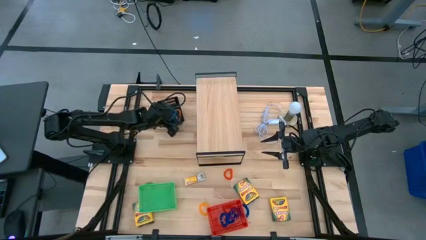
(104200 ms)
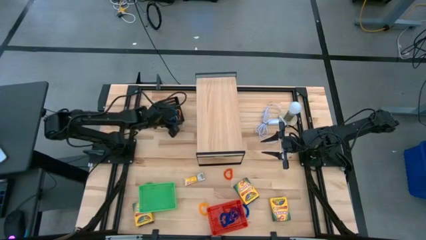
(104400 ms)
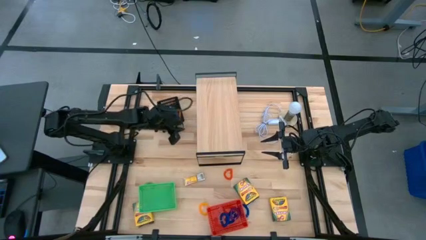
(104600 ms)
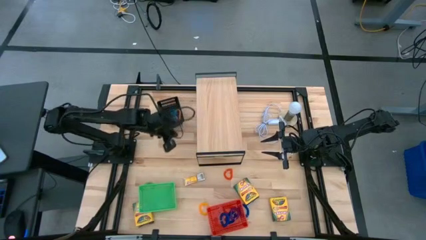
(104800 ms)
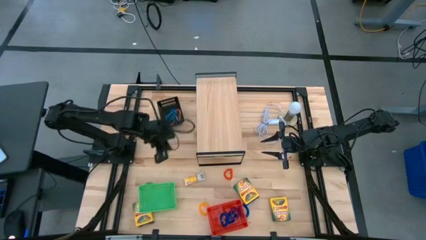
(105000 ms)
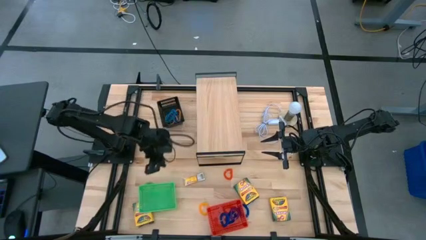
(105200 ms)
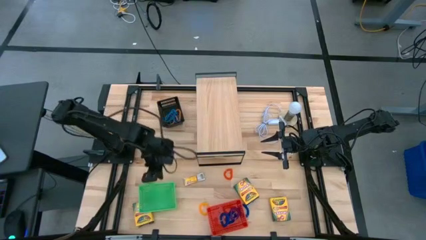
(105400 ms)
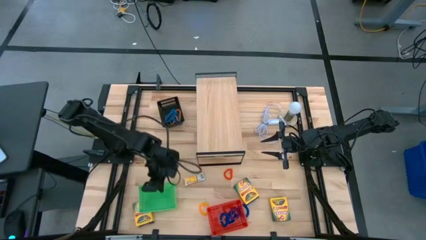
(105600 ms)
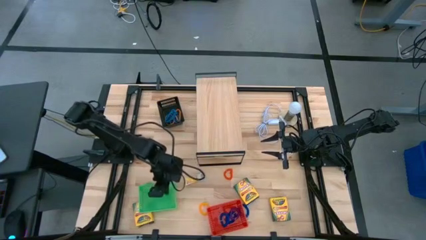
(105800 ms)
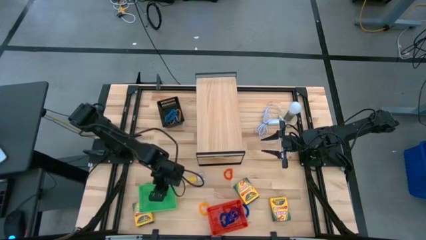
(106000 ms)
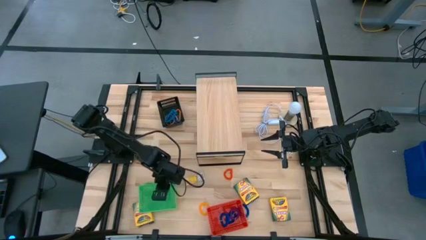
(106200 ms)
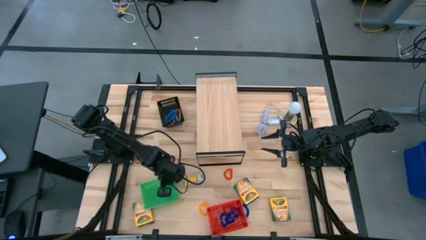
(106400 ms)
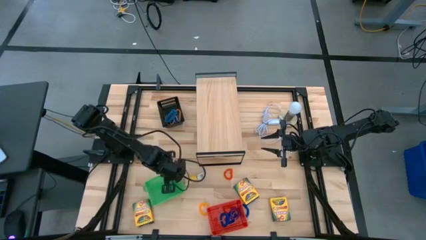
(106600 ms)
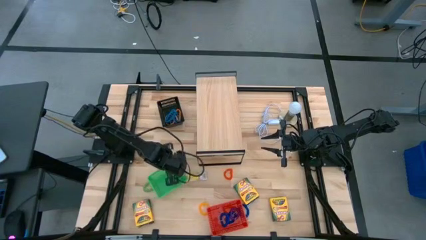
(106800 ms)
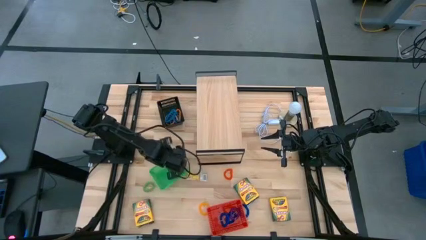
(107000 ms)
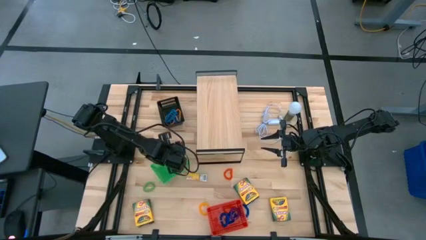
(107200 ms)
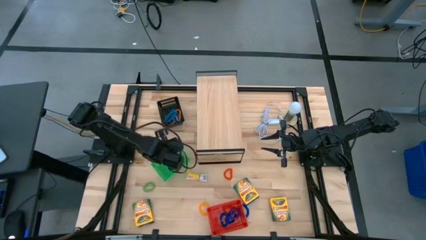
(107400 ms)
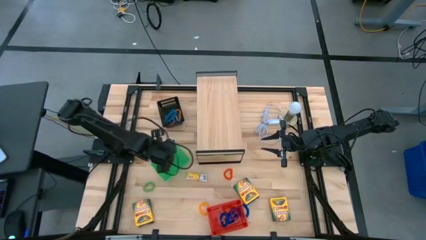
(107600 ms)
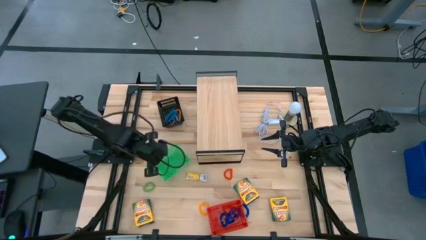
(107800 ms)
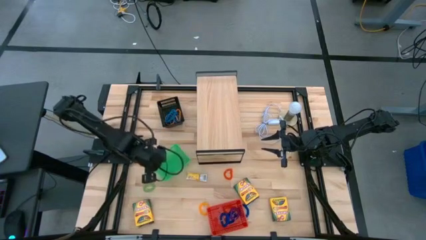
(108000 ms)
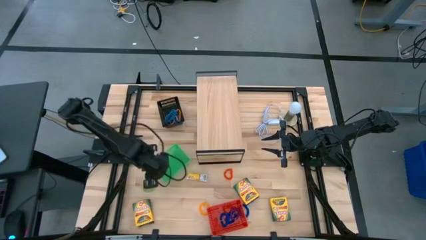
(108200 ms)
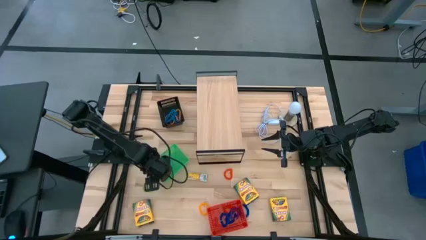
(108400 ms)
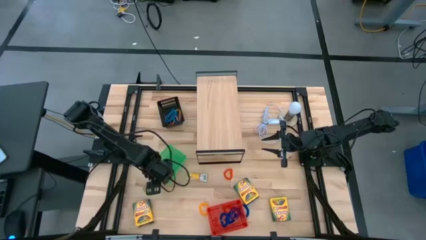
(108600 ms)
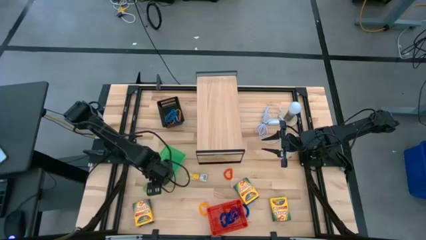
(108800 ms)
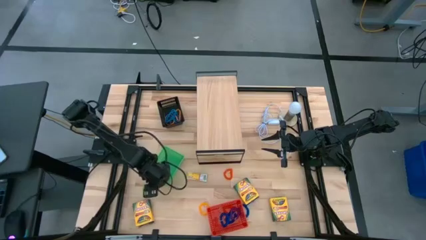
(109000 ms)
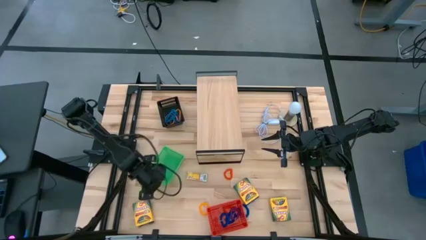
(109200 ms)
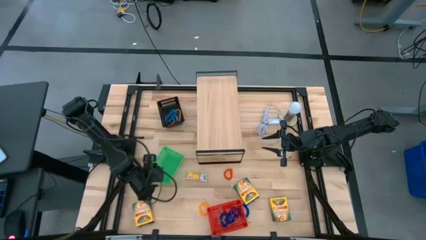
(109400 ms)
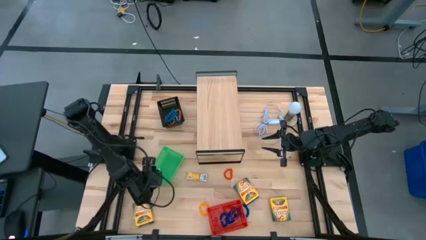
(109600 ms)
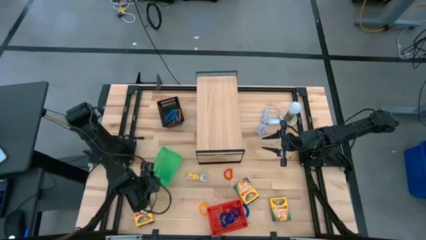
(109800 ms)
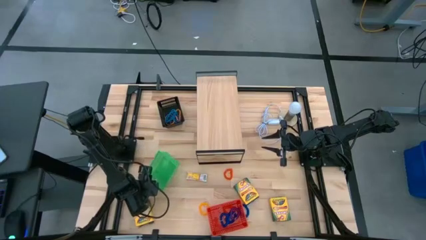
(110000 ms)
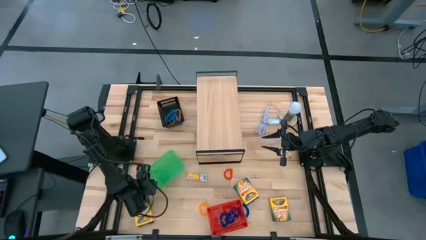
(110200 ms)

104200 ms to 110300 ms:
Task: Pick & Place Office Desk Supplies
Adjust the green basket on the table

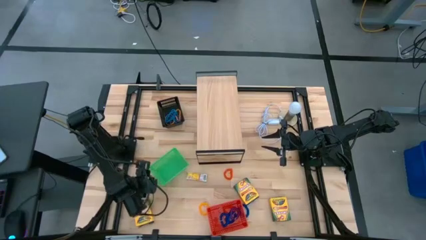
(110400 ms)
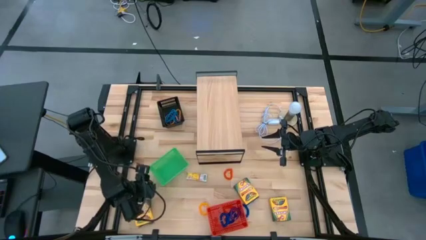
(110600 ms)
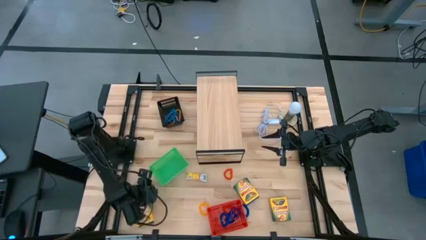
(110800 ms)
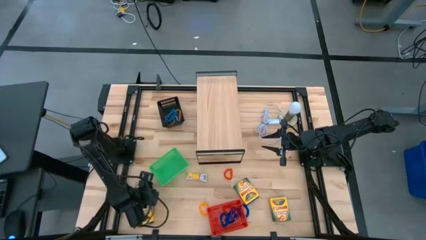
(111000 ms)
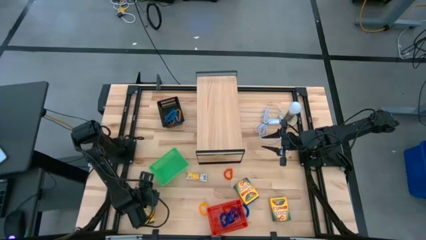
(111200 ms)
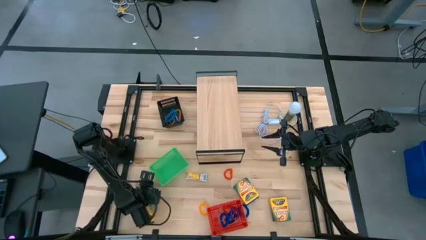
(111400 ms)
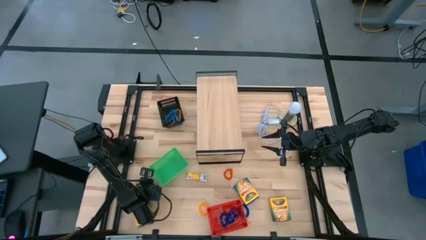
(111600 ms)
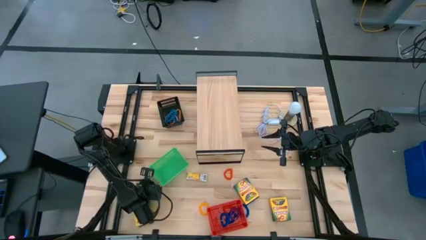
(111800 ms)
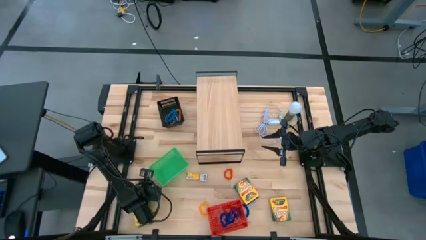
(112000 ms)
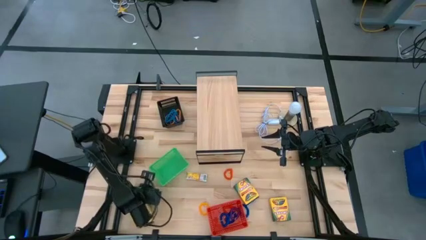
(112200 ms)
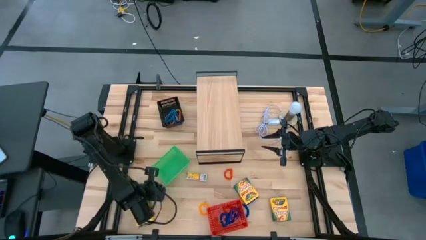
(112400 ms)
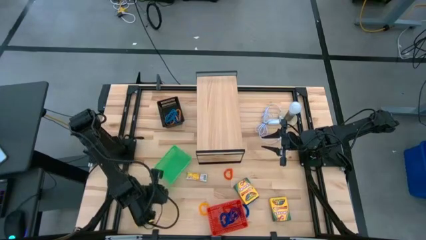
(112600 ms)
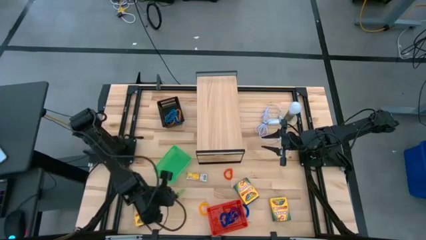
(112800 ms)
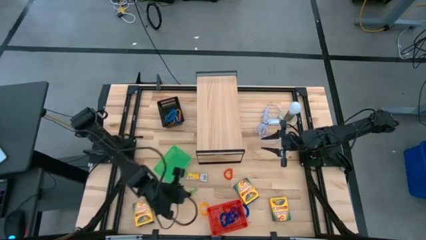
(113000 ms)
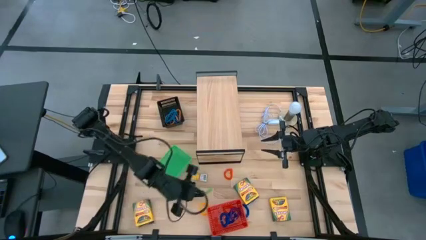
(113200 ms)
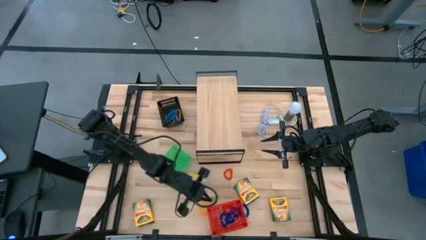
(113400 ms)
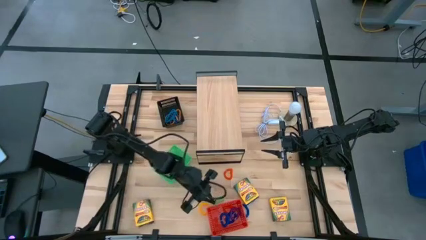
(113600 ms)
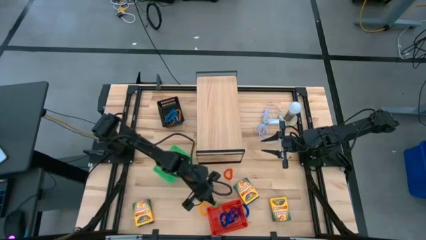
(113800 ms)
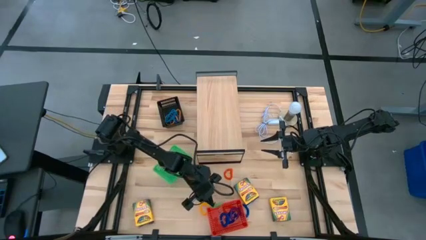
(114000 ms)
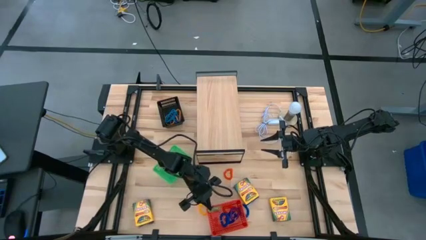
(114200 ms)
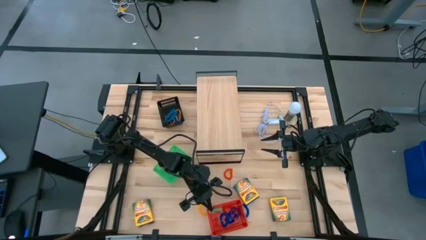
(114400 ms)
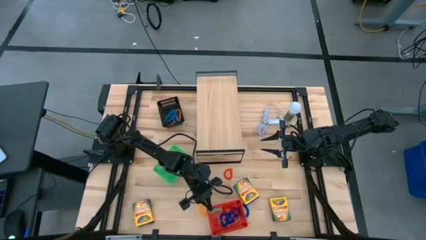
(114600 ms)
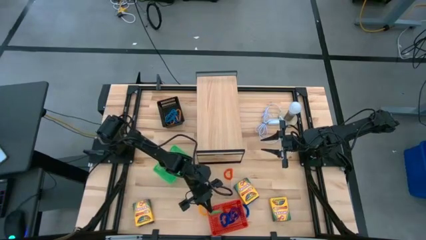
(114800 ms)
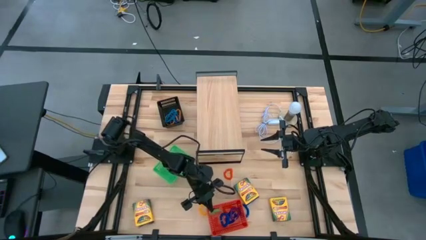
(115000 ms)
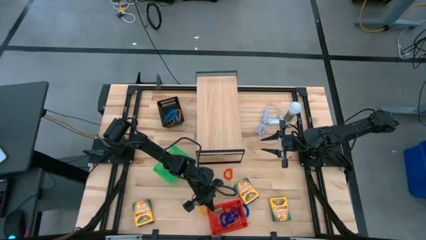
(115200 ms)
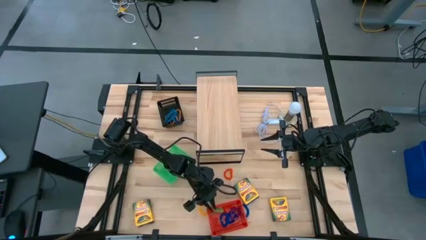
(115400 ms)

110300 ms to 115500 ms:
Put the green spring keychain into the red basket

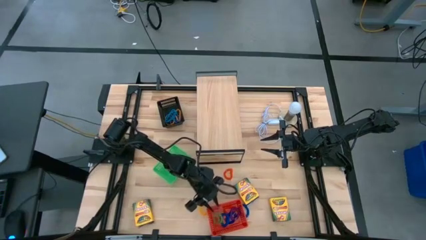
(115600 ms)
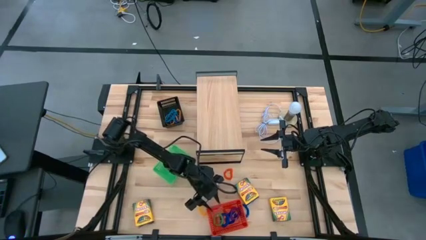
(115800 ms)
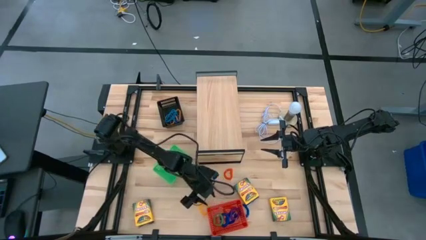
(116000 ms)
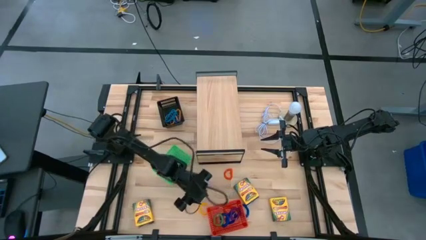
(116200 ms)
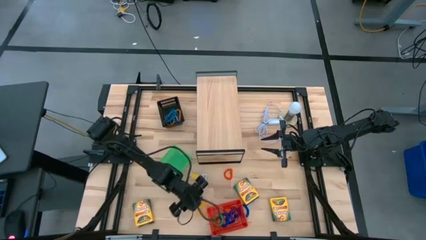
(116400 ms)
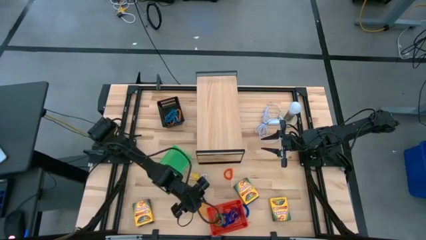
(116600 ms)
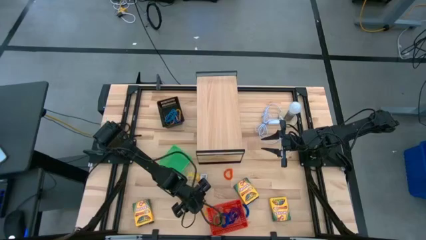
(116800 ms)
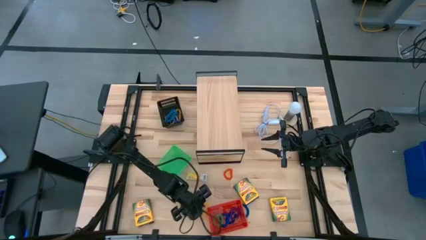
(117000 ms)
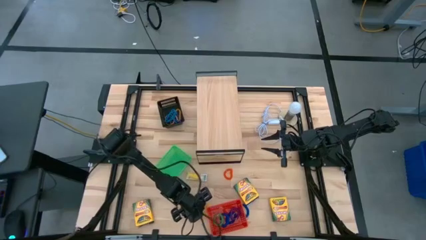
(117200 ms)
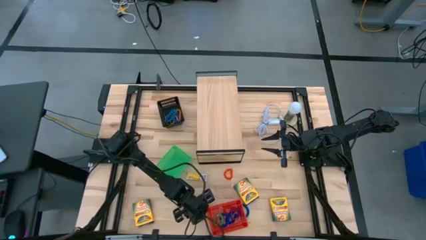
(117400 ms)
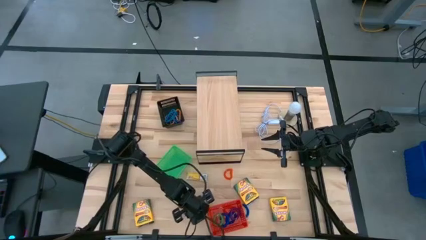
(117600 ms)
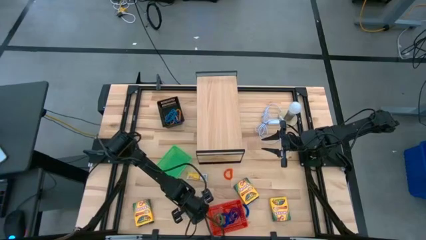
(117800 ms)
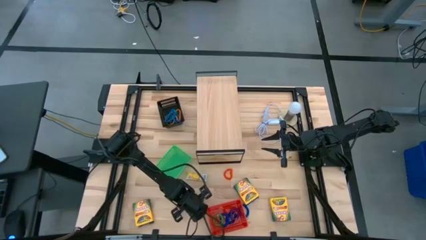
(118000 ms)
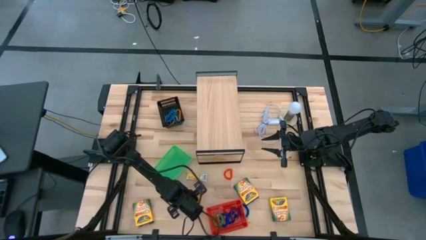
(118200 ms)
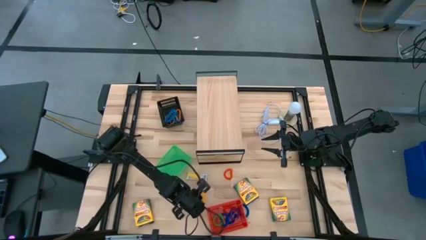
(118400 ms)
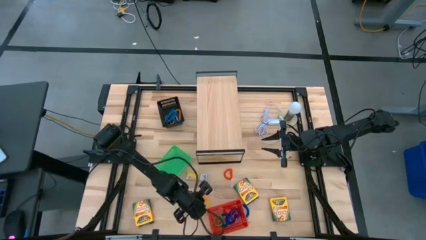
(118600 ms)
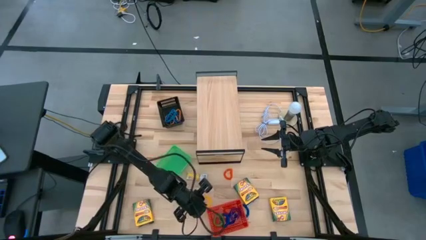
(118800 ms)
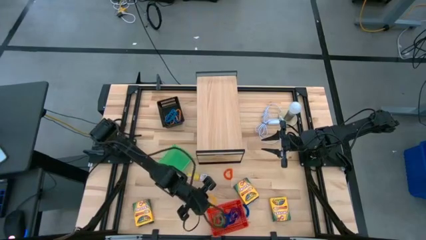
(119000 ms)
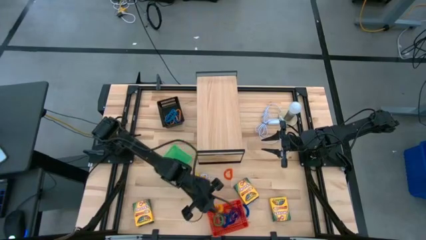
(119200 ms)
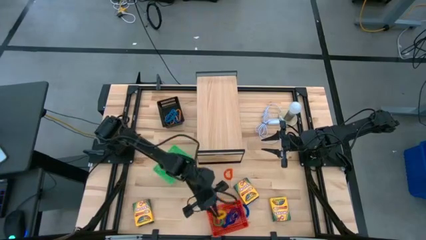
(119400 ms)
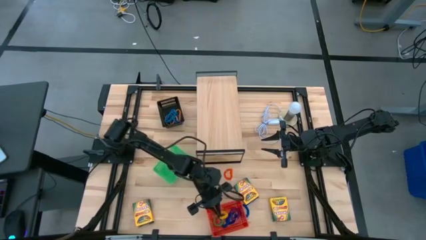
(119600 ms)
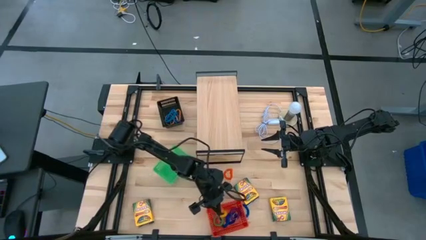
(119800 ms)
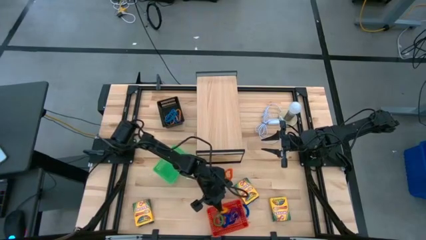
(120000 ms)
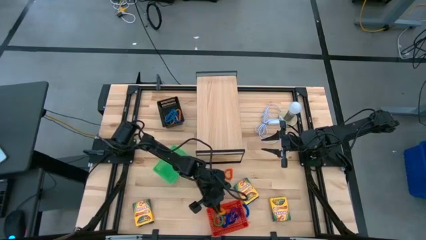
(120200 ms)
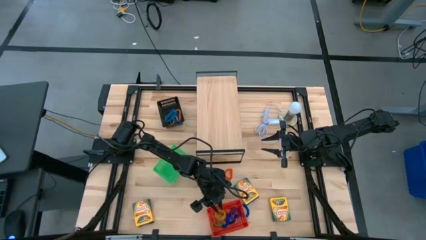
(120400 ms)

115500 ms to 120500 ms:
Put the yellow spring keychain into the red basket
